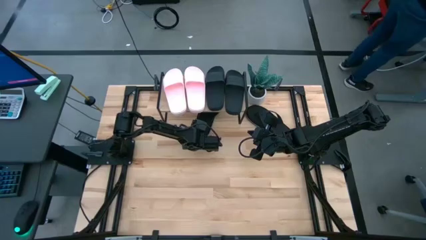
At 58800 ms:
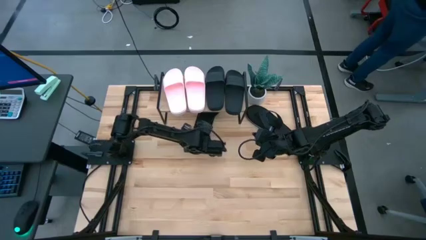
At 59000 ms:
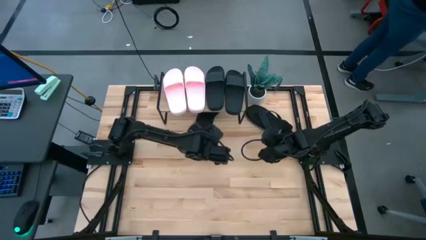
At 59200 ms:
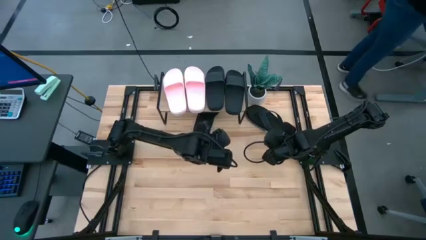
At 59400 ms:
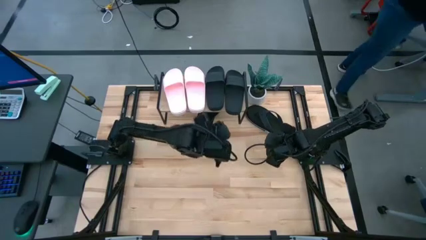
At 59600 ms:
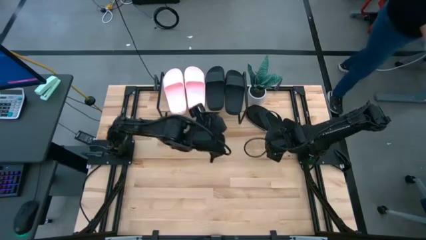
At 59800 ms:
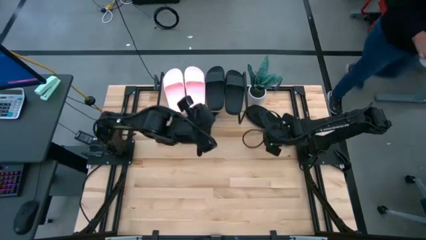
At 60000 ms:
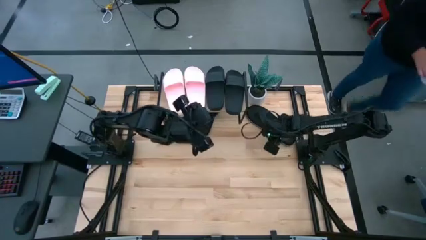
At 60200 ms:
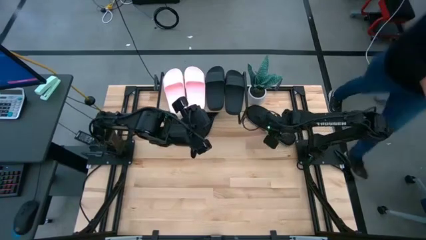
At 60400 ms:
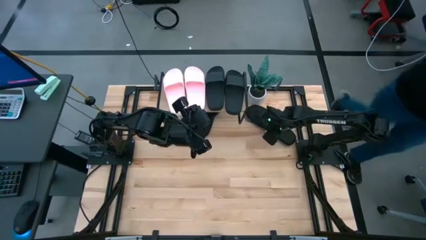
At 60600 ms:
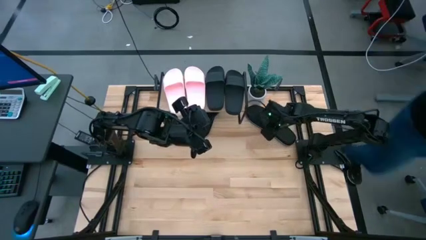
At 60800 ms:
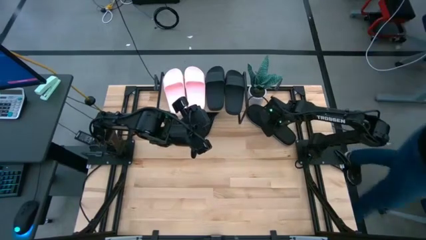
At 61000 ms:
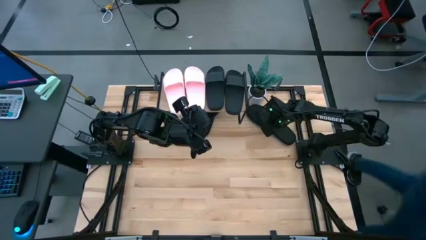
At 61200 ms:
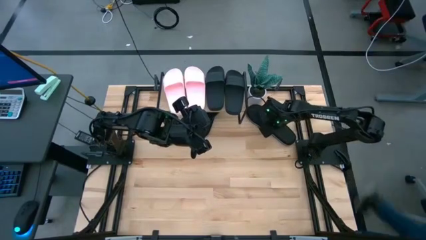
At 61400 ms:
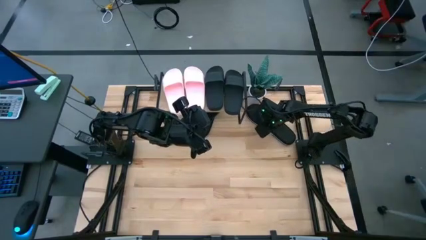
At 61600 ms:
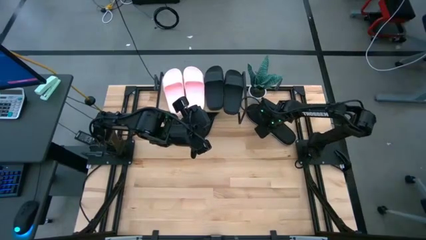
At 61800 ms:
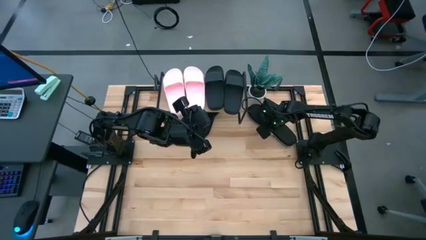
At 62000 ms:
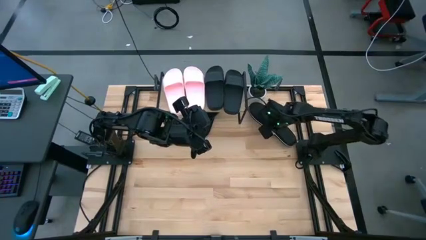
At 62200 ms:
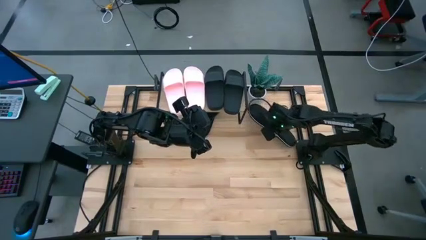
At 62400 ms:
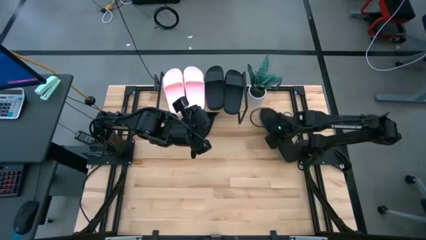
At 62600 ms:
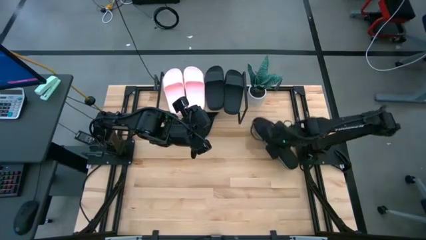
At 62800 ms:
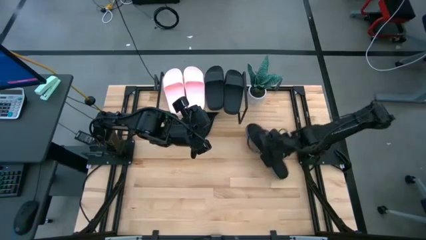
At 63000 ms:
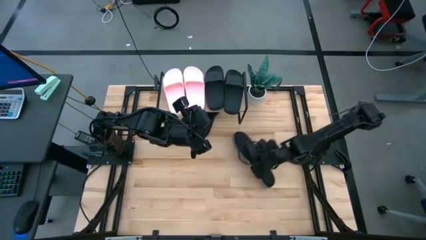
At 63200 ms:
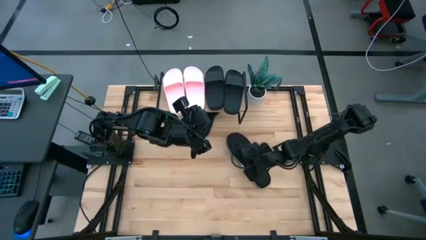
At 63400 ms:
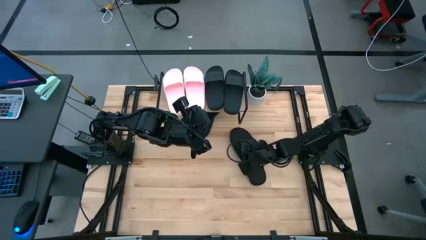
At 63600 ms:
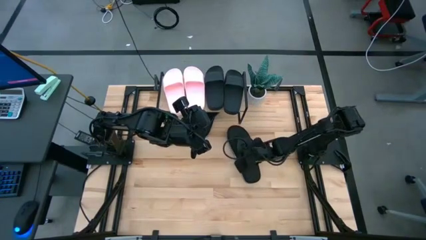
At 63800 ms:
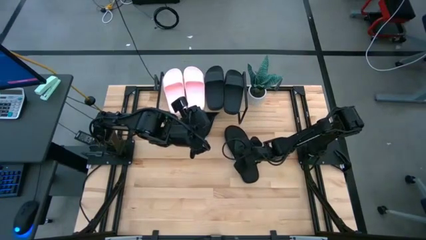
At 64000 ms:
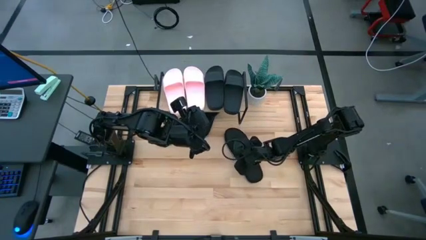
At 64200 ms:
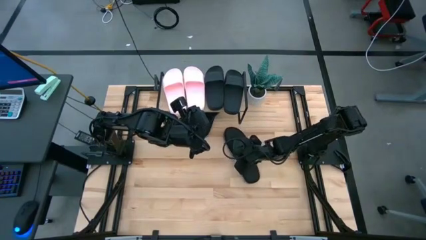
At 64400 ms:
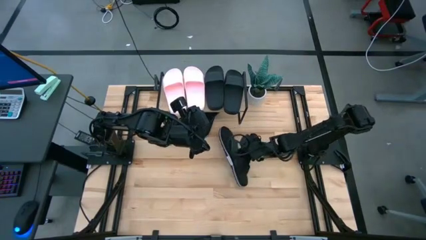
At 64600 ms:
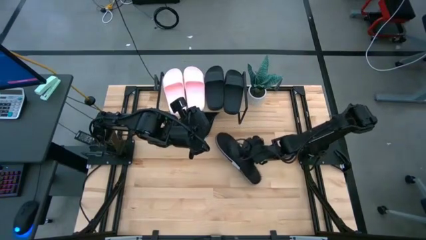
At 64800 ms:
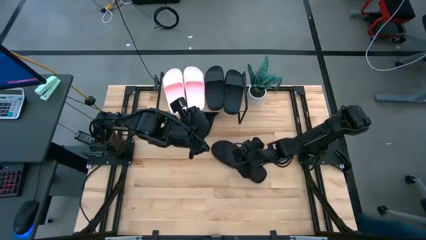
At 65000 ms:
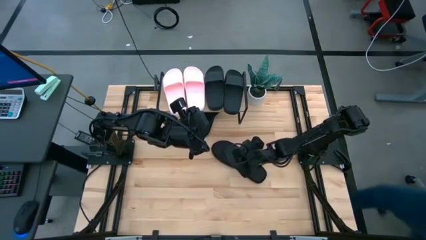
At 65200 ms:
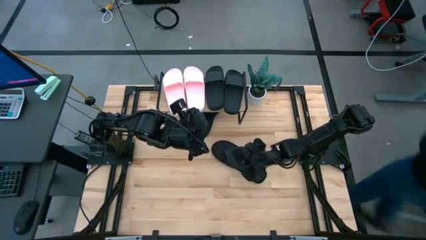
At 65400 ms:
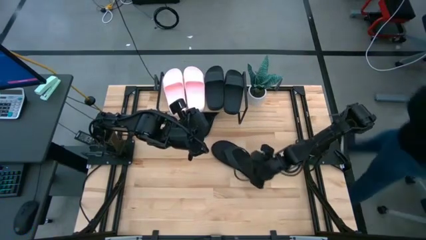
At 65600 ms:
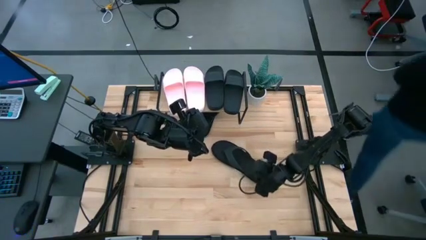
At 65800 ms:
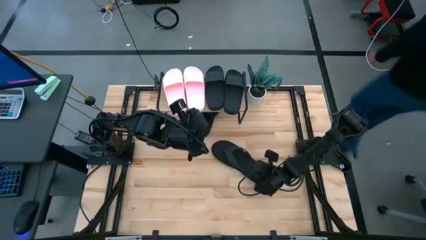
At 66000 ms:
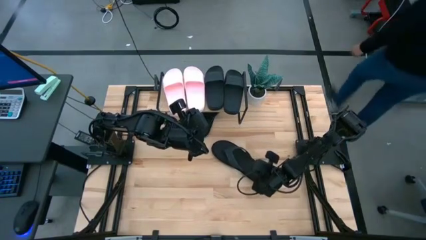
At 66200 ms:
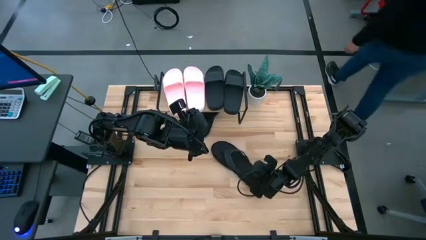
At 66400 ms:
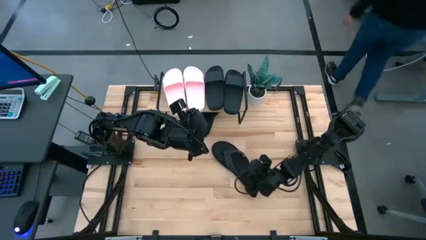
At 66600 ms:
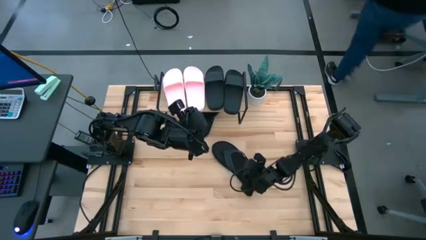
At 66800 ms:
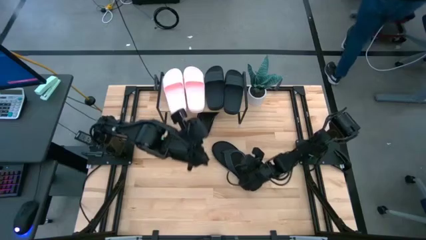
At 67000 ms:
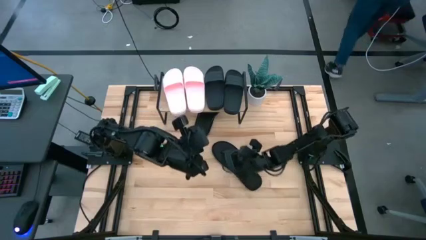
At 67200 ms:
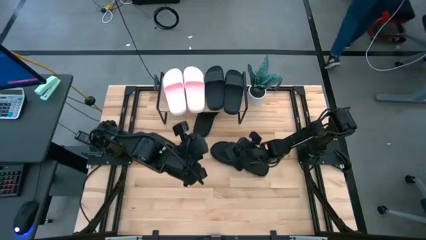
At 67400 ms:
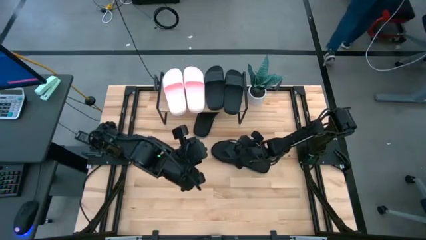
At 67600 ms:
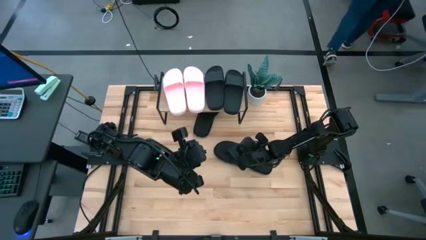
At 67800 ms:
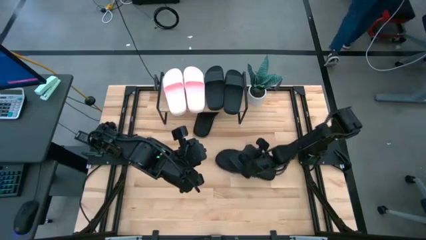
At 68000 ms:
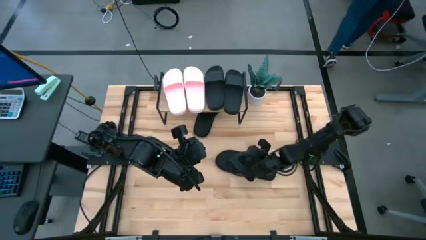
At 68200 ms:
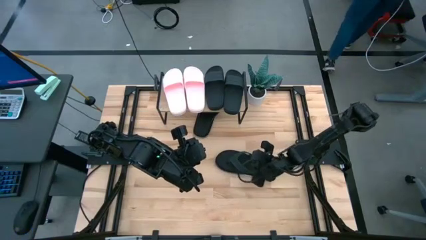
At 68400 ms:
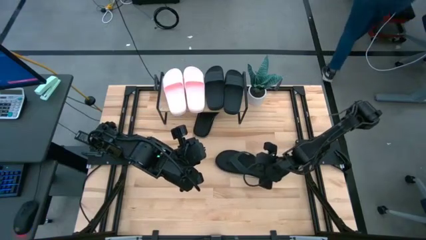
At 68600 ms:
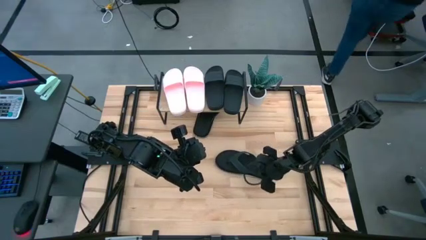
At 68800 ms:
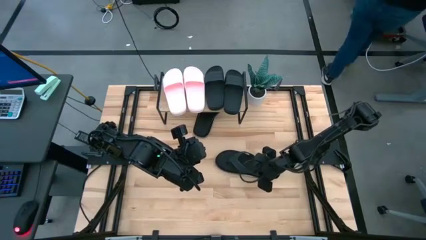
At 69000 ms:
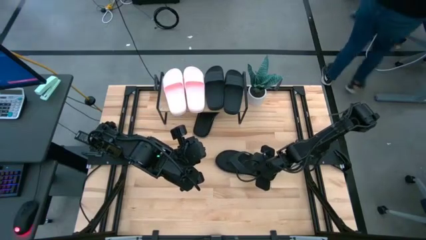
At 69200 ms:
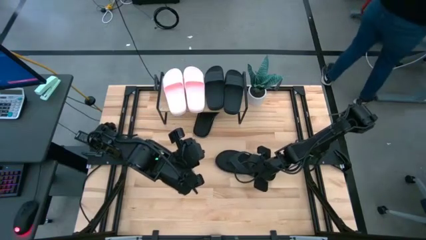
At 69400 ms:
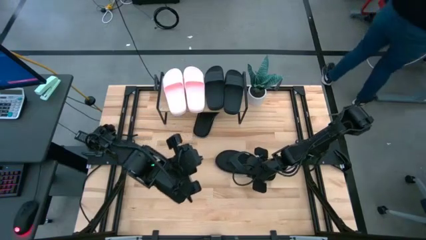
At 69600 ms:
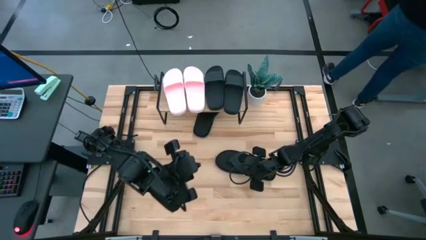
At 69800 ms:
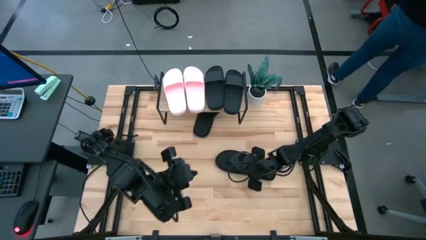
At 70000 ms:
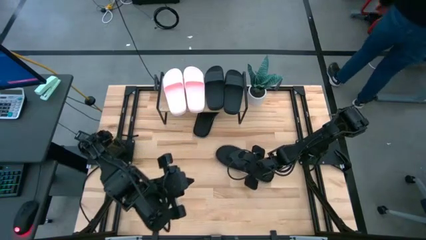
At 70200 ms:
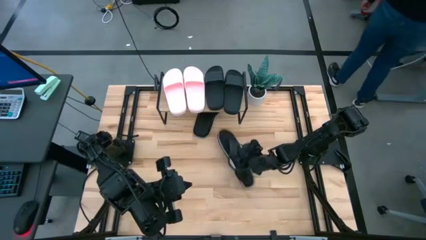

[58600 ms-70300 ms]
Task: Pick and place slides into the shelf
Put the black slipper under the shelf

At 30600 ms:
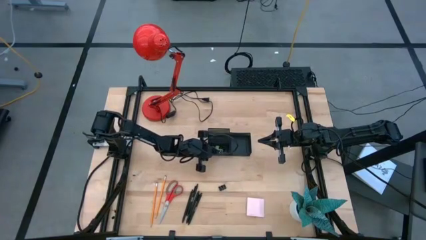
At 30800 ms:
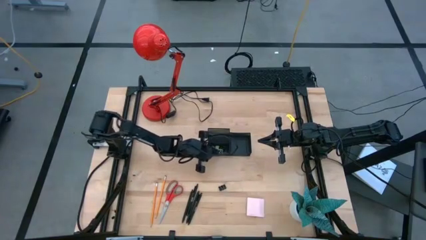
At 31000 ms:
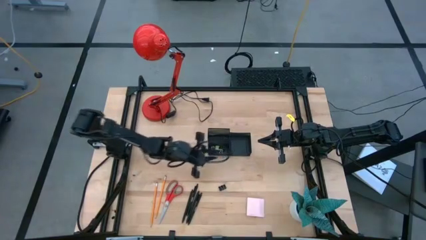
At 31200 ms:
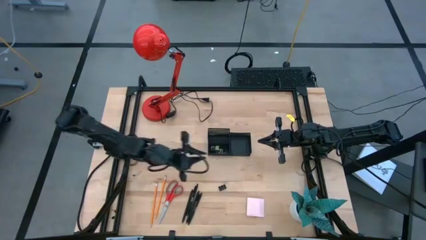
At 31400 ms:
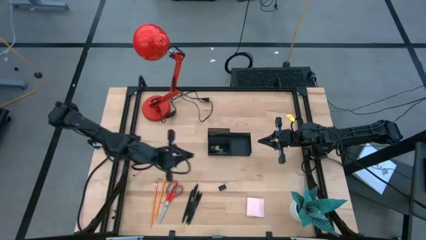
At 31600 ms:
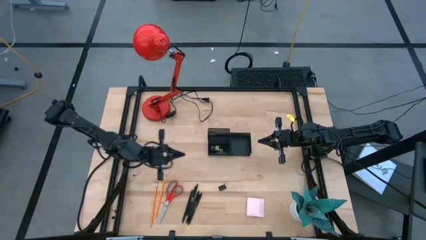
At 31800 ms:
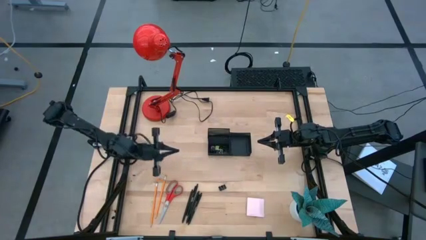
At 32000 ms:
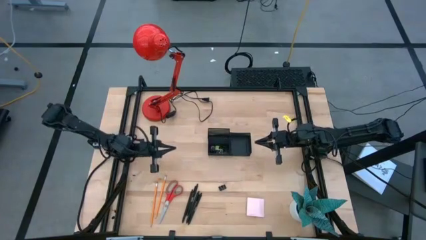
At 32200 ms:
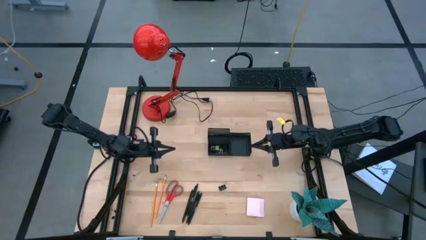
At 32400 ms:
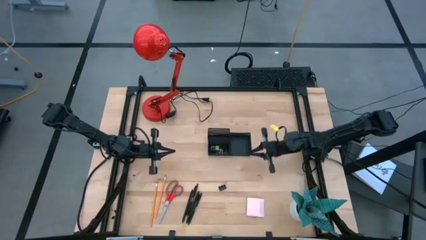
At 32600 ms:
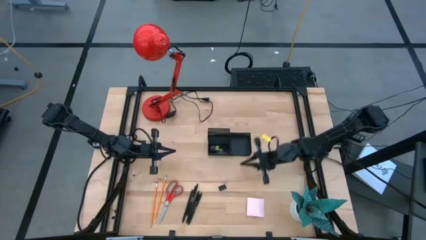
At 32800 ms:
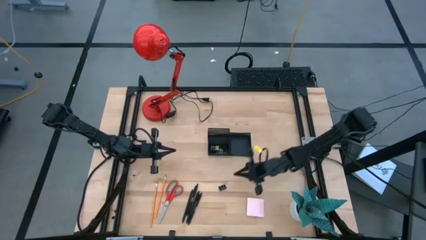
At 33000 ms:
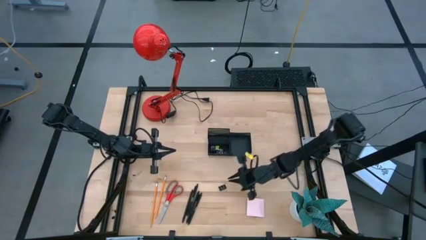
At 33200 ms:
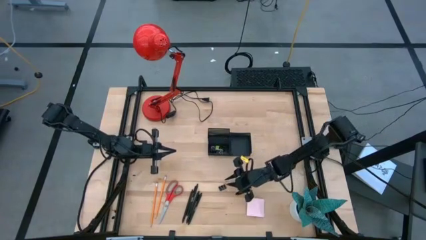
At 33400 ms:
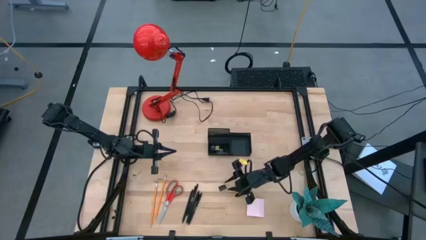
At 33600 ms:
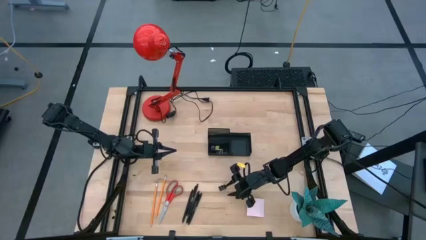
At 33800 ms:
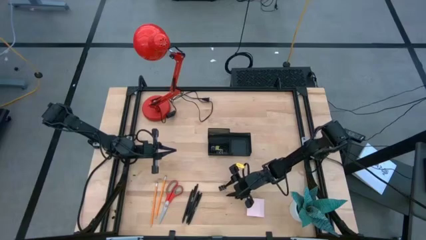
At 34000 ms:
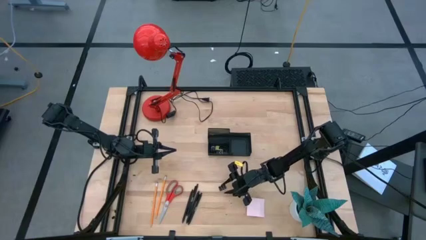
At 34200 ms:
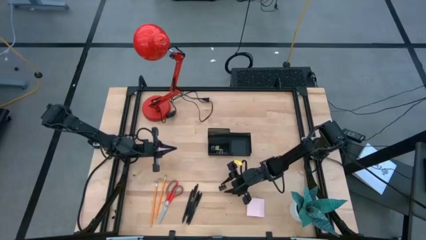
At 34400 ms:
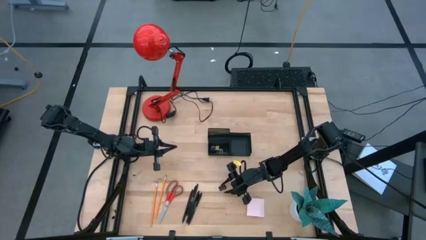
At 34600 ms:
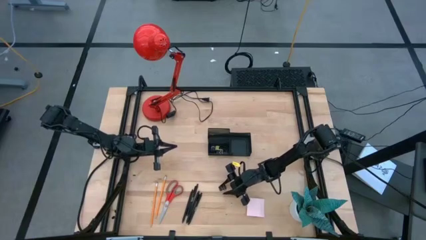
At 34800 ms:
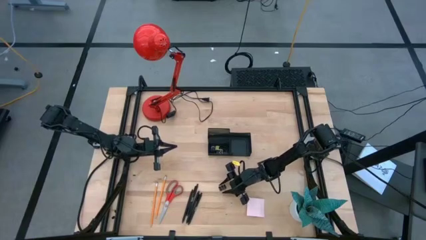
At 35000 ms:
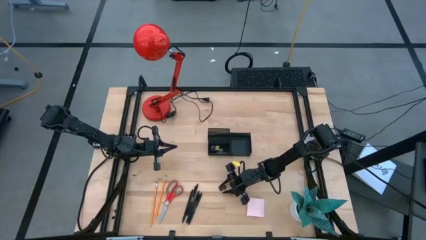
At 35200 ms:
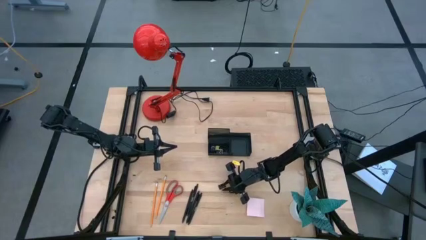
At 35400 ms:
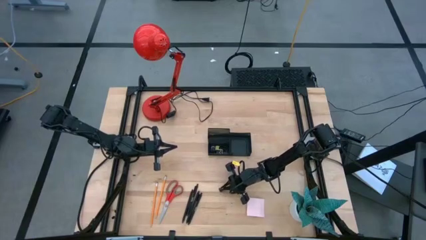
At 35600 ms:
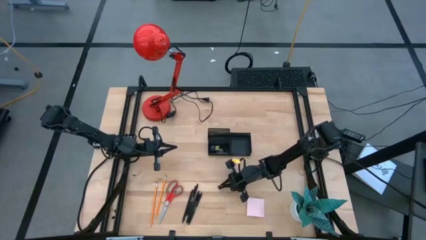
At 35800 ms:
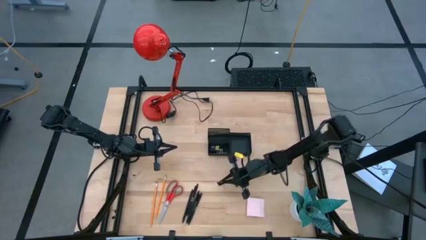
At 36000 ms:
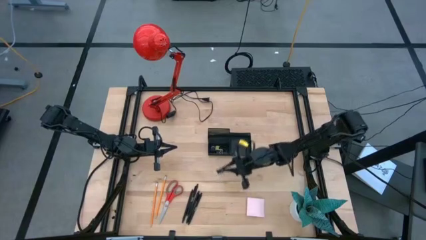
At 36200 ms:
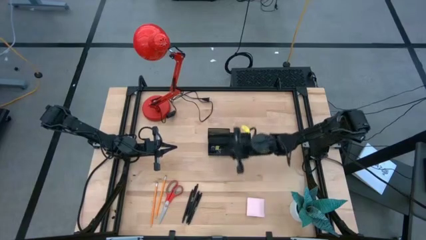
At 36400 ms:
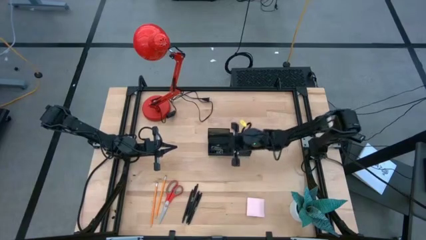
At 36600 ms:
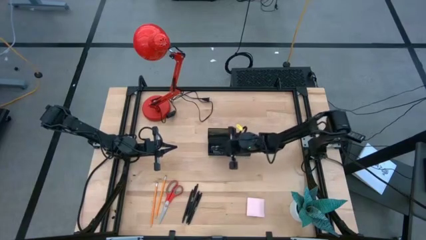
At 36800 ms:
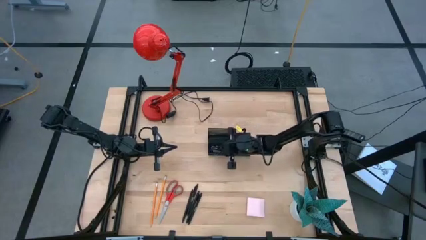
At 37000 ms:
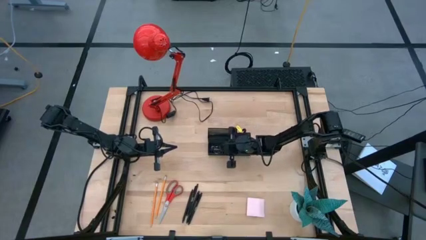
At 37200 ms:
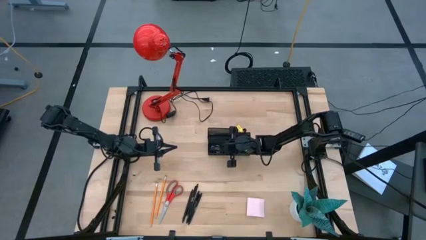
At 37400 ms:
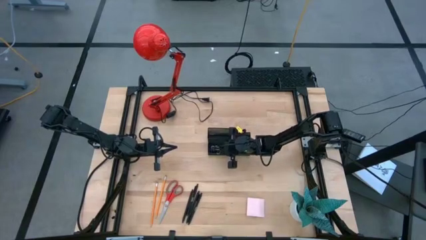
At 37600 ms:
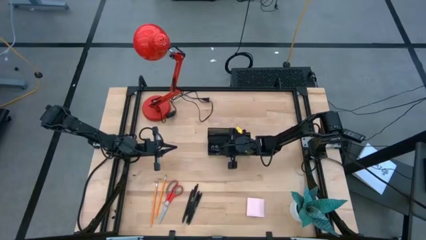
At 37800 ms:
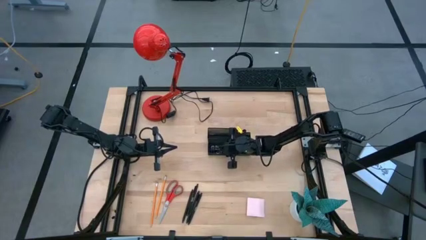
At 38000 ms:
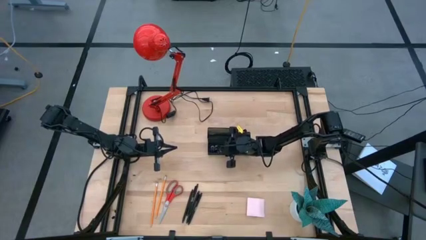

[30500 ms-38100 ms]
Task: Pick and place office supplies into organizer
Put the black binder clip into the black desk organizer
